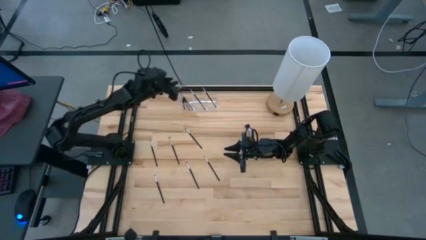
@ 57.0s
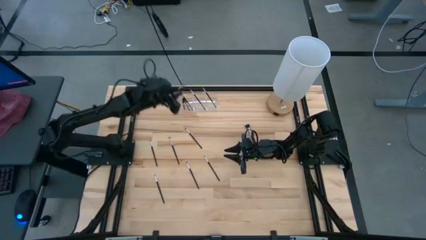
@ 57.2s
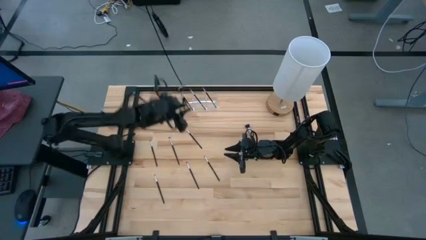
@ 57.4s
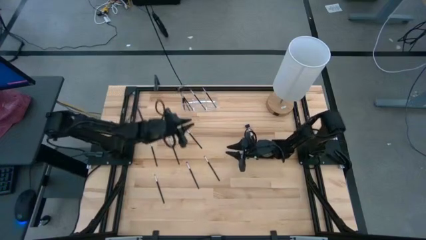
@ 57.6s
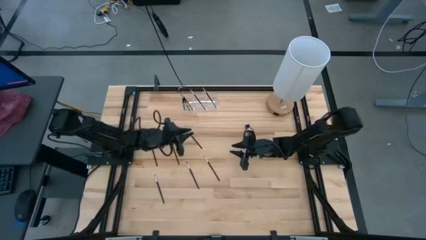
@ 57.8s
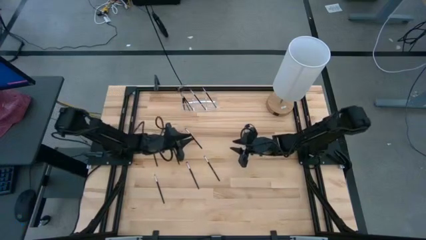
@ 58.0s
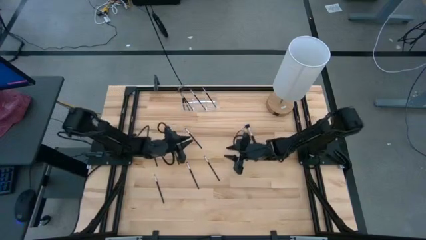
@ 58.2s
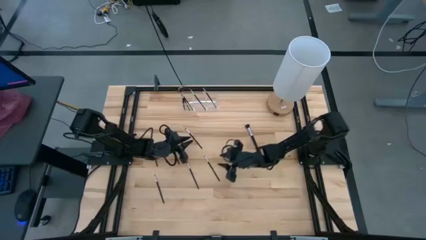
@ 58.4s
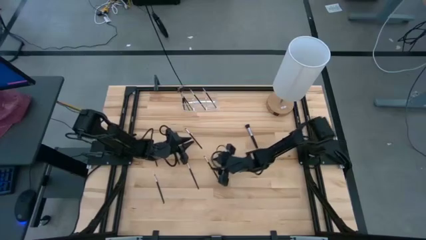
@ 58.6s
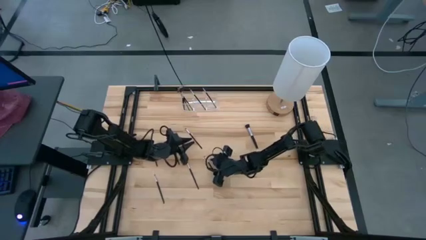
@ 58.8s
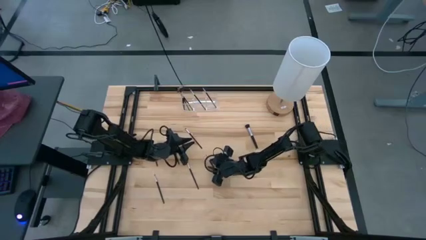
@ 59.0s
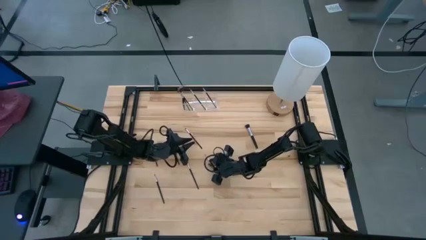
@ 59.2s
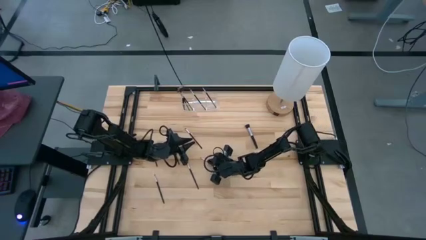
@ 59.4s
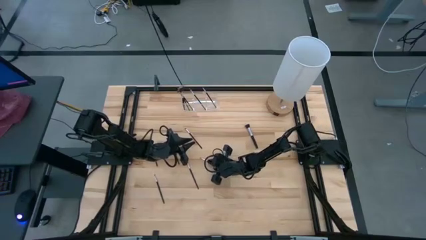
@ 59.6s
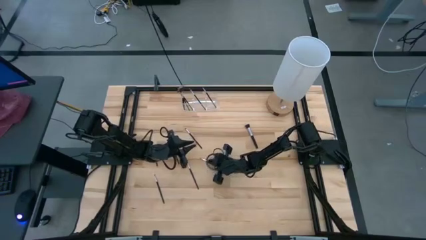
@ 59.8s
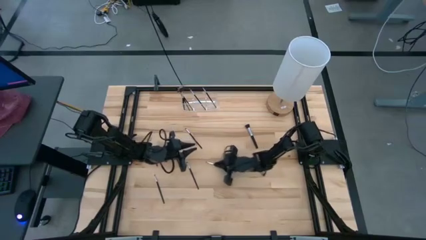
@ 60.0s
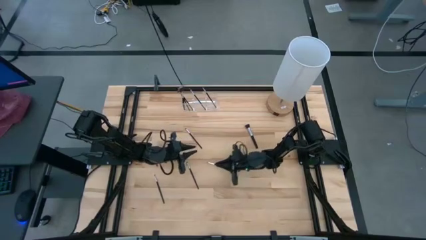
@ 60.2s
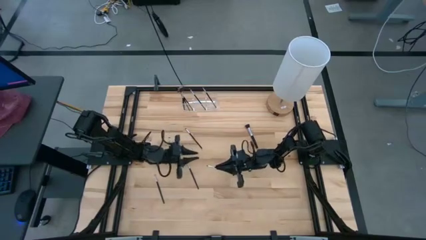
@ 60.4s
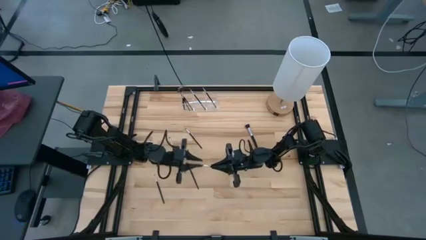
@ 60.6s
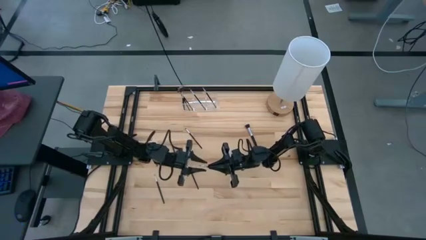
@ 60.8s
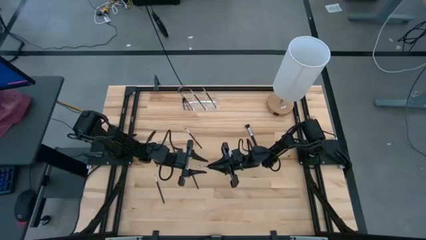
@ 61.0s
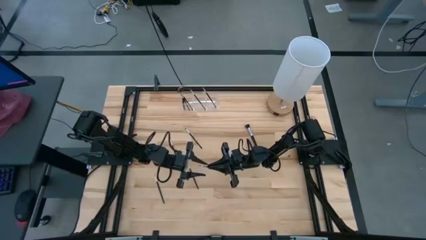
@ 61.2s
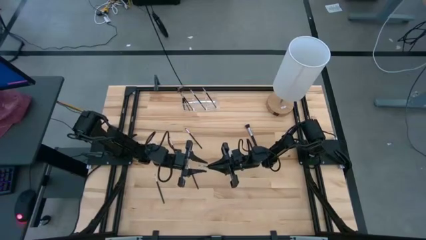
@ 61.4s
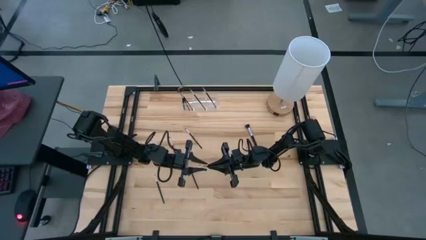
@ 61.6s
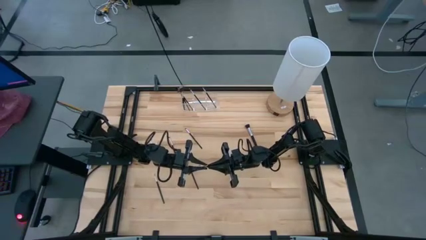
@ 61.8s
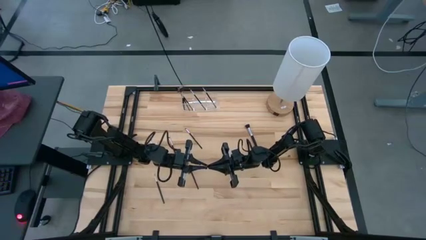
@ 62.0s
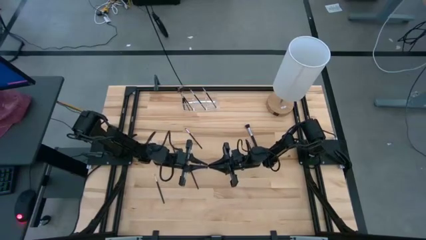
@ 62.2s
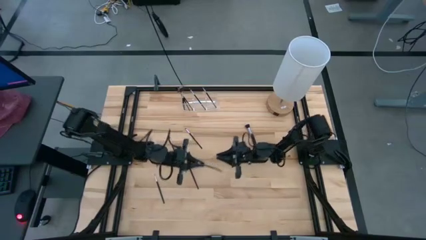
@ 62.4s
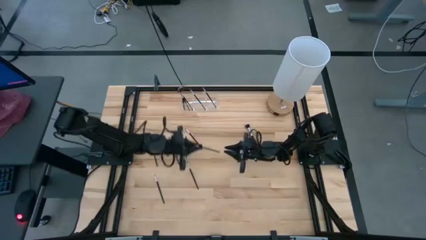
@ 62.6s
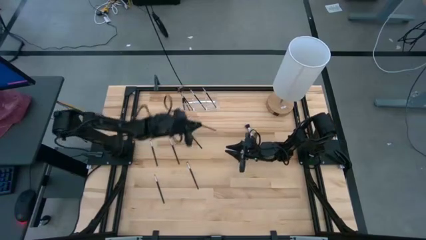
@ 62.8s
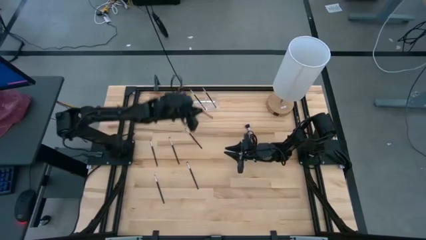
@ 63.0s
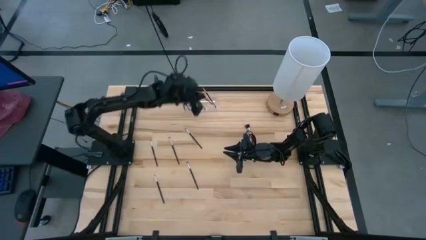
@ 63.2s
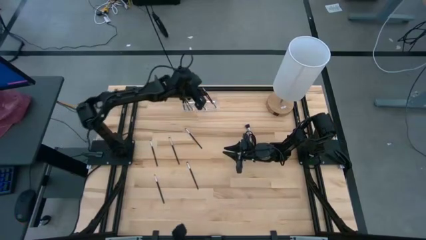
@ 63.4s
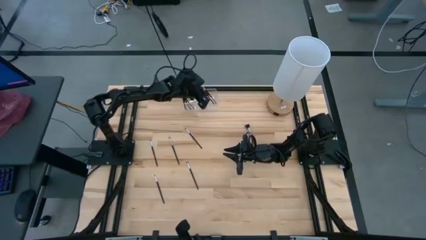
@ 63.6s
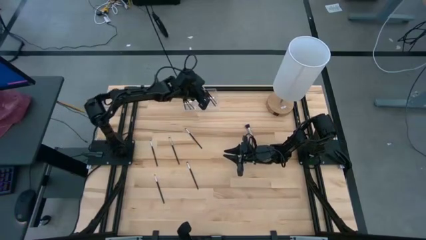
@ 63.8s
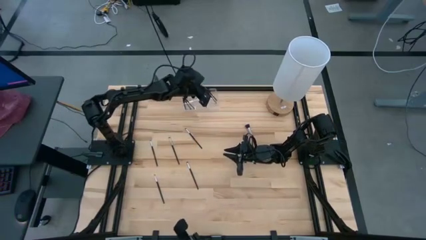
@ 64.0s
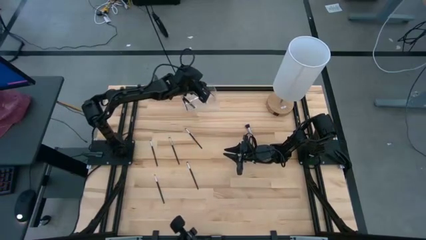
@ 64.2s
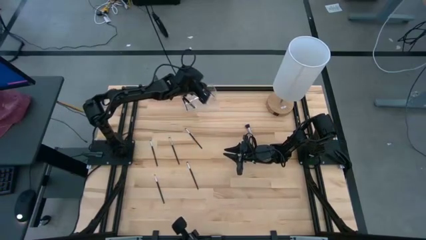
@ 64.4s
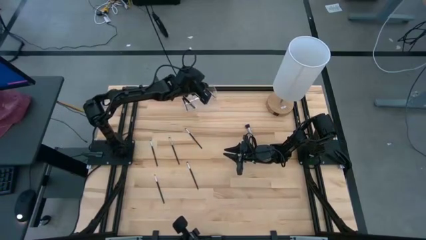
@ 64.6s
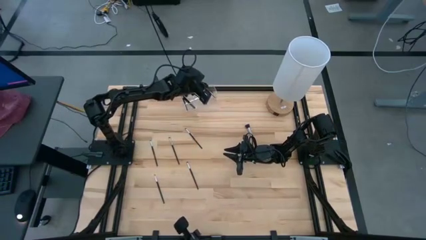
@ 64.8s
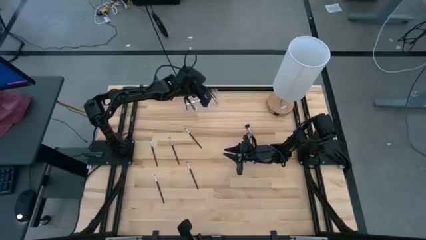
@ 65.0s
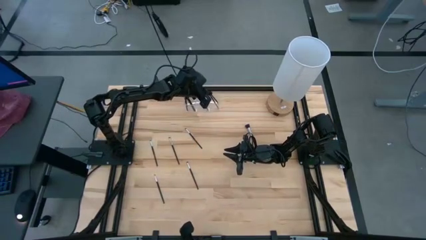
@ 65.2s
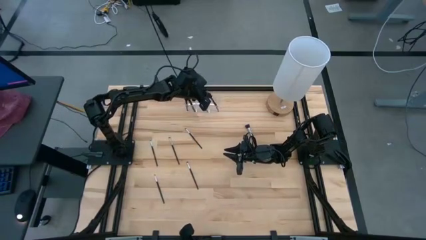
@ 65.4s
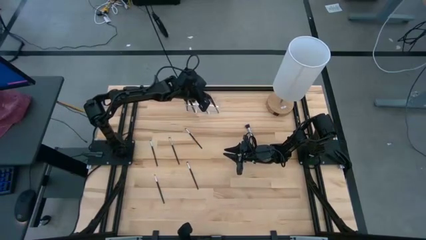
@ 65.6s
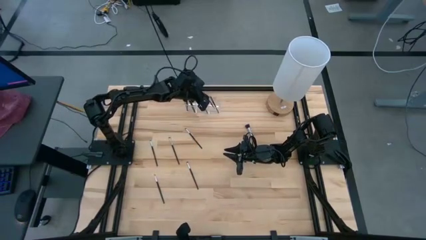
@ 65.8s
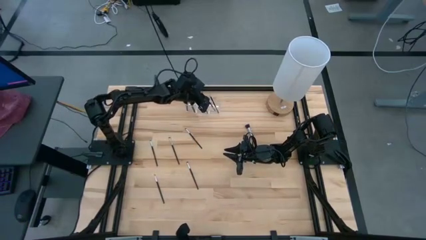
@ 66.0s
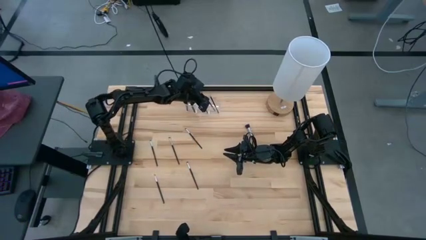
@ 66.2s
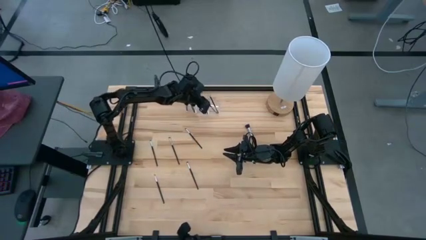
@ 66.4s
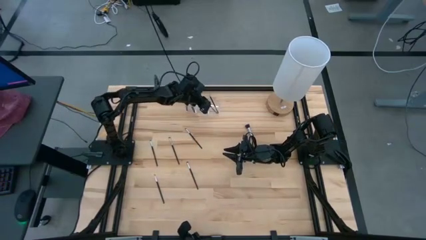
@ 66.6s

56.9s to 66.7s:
Task: Put items in baskets/containers
Put the black eyeshadow brush into the transparent organizer

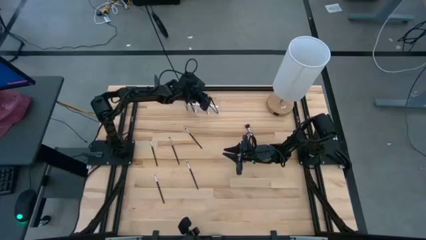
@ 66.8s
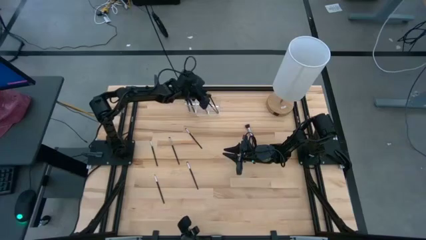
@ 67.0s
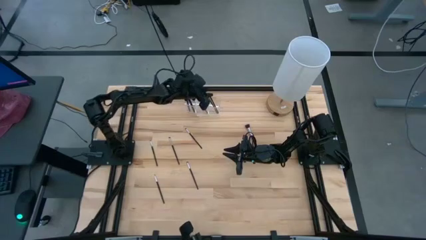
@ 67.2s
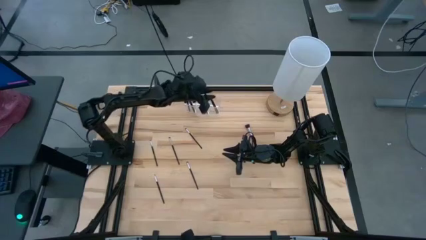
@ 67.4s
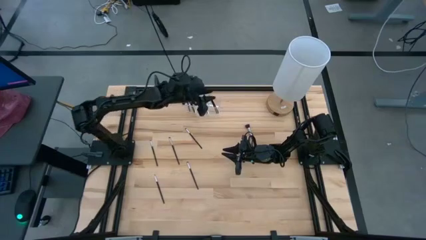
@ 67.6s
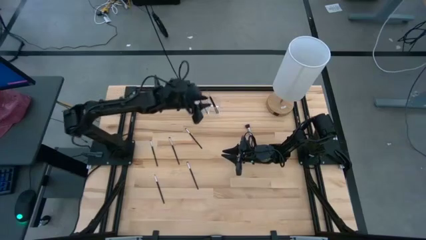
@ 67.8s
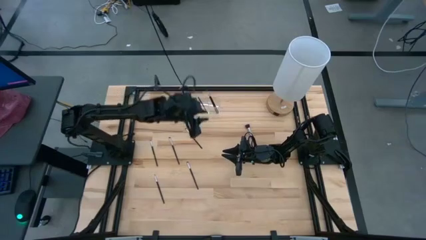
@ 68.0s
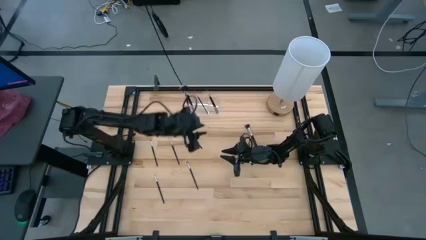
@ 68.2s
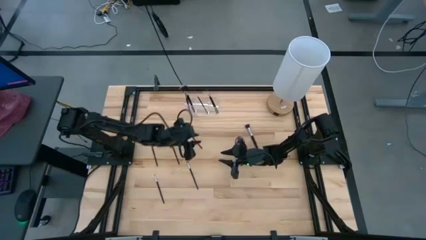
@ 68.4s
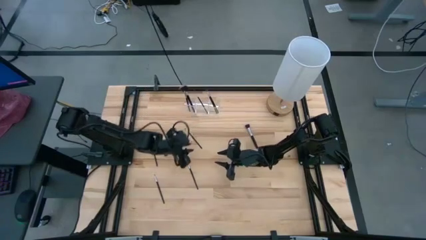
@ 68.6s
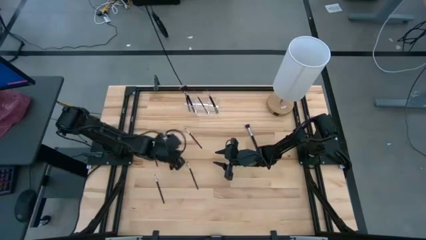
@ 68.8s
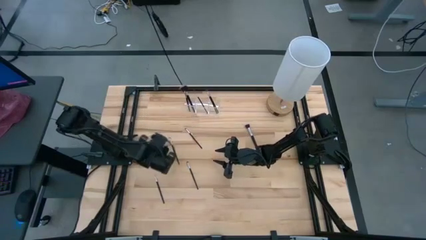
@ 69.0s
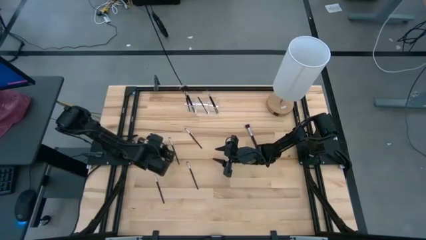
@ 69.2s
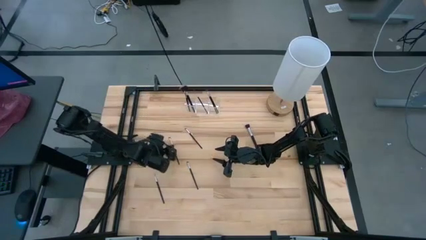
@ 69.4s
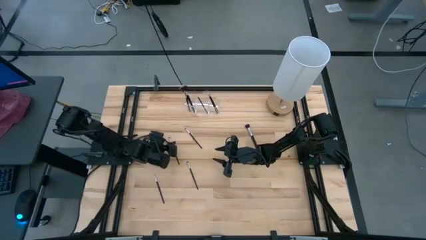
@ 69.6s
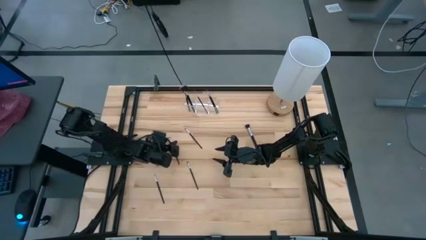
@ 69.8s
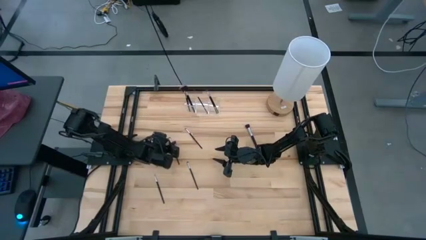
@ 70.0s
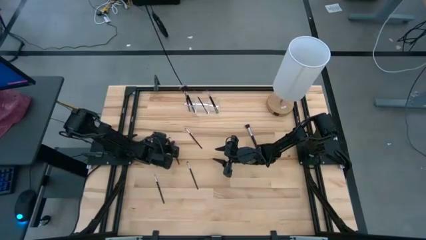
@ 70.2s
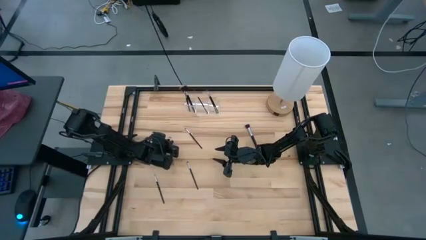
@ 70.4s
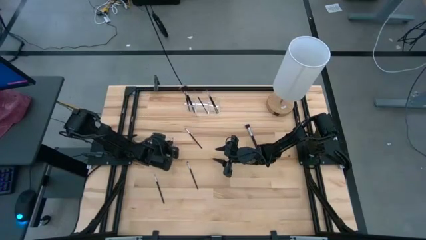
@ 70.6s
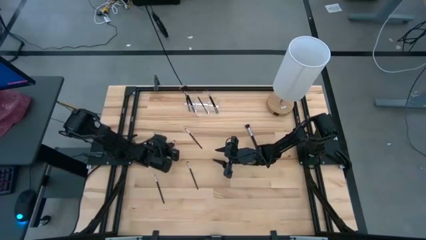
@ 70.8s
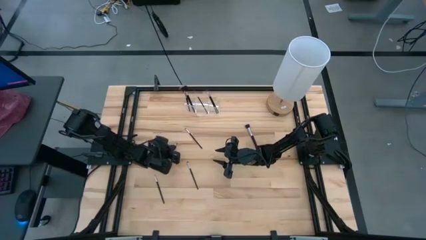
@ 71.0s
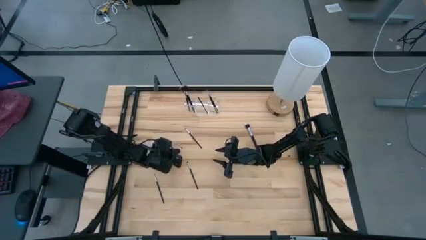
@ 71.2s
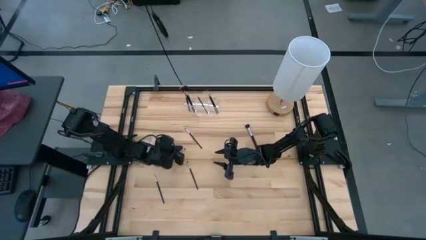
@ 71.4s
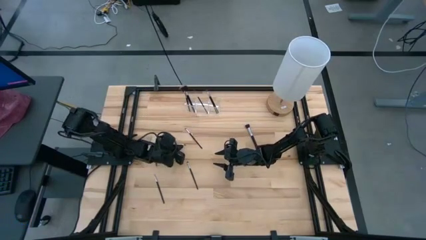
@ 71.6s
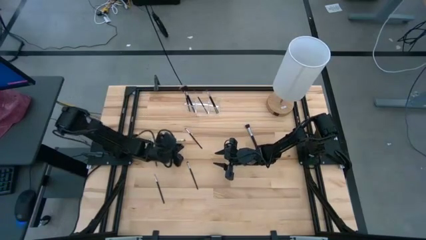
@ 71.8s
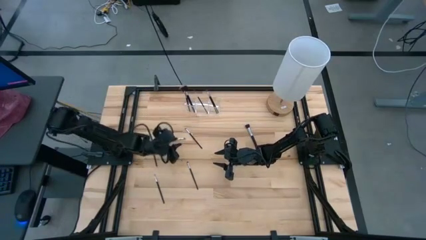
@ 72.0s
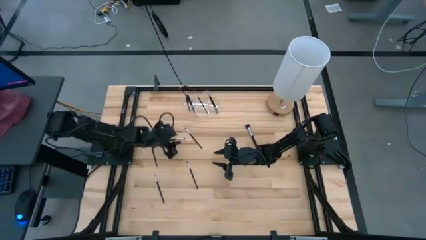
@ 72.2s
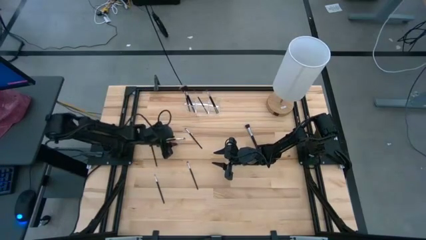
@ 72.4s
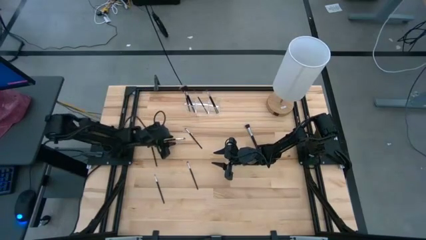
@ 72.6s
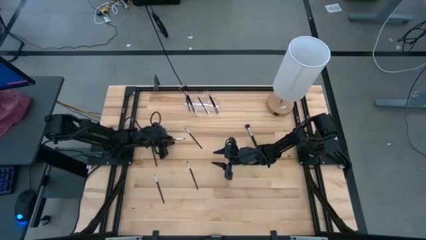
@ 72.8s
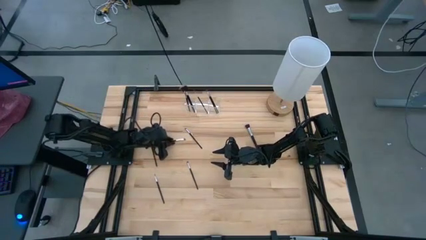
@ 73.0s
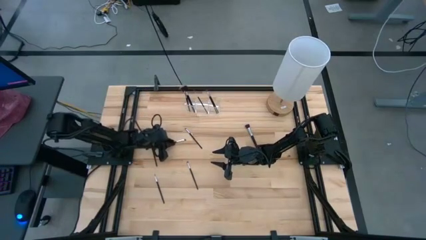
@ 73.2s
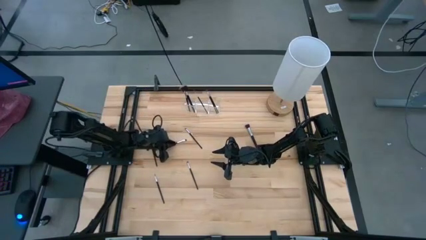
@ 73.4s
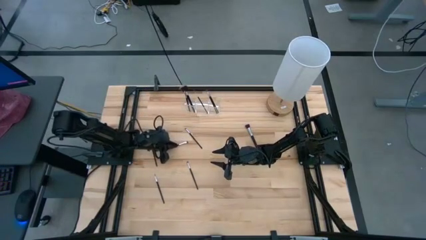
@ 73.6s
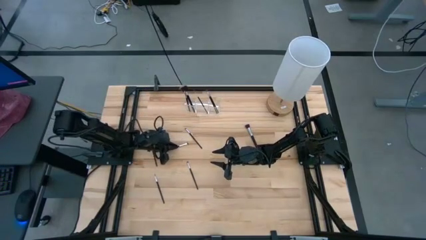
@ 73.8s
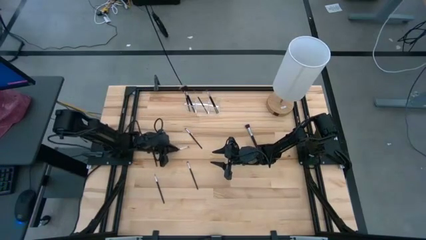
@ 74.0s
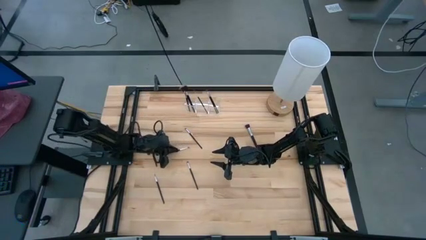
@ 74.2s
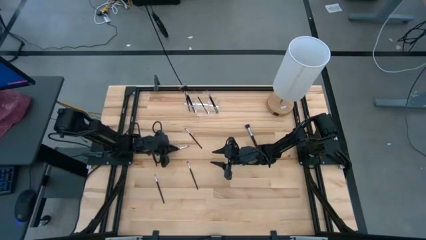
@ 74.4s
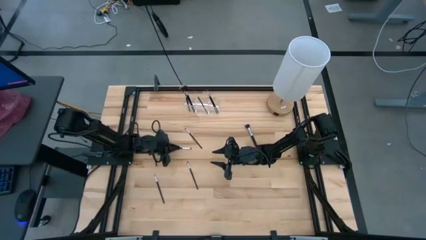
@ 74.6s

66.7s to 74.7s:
Put the black eyeshadow brush into the transparent organizer
